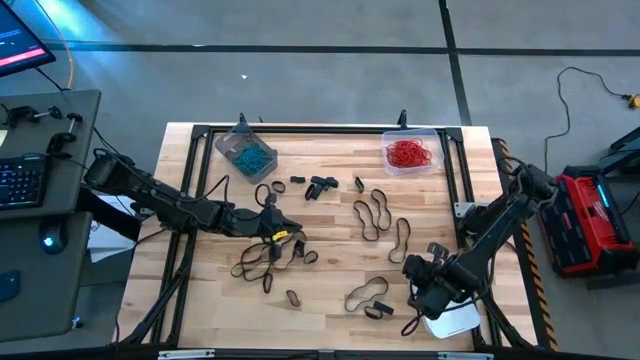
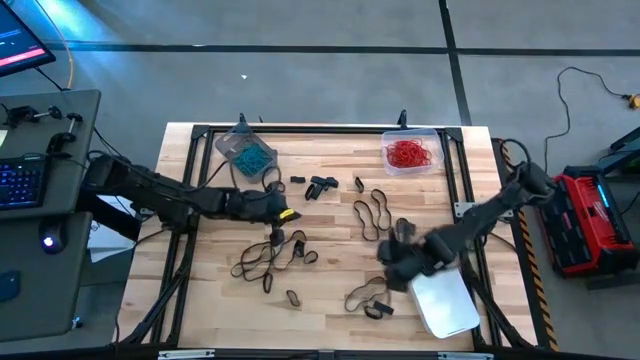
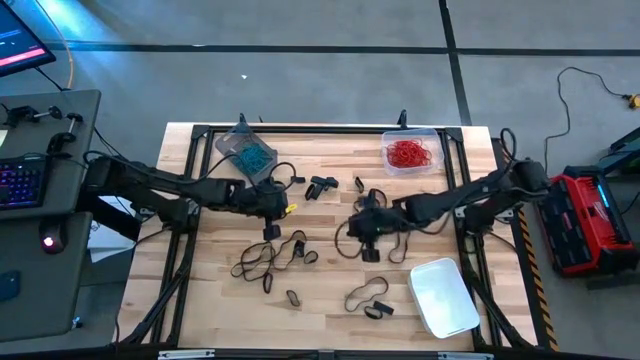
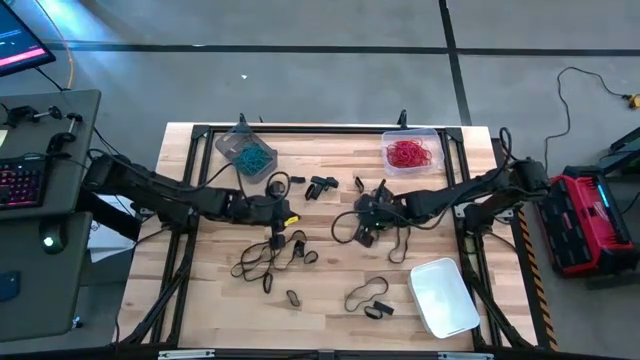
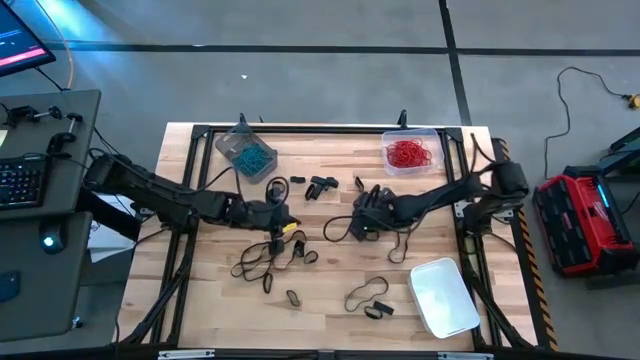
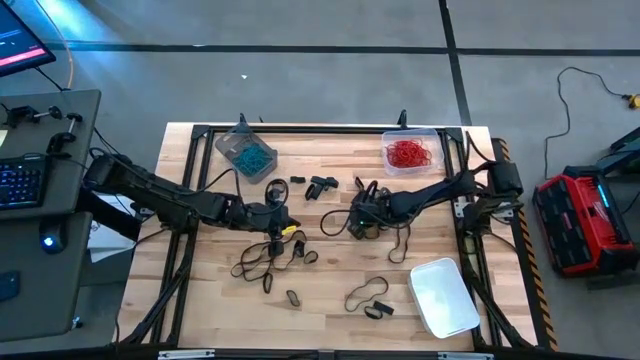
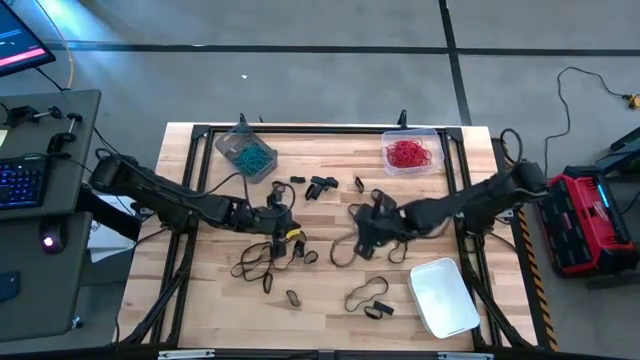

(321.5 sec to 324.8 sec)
Task: Sort rubber bands into baskets
Put the black rubber band into the white bin

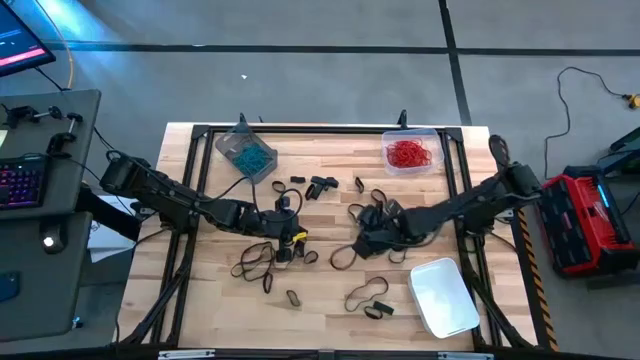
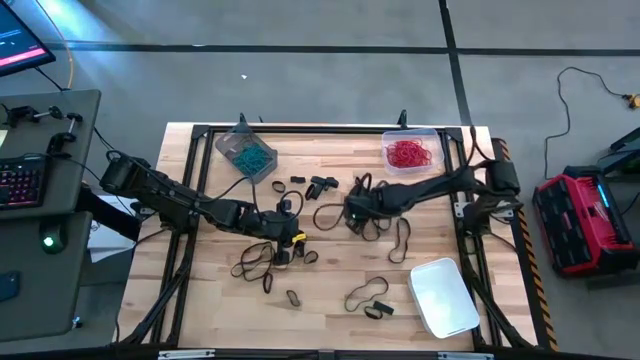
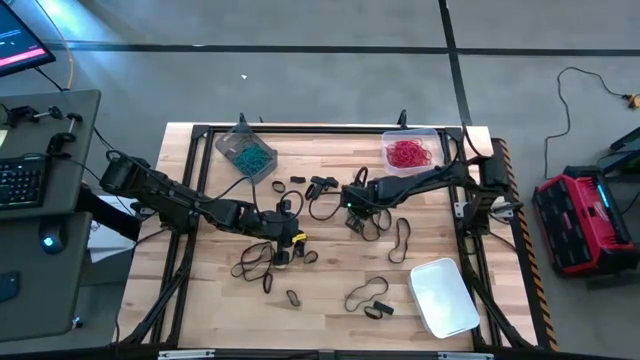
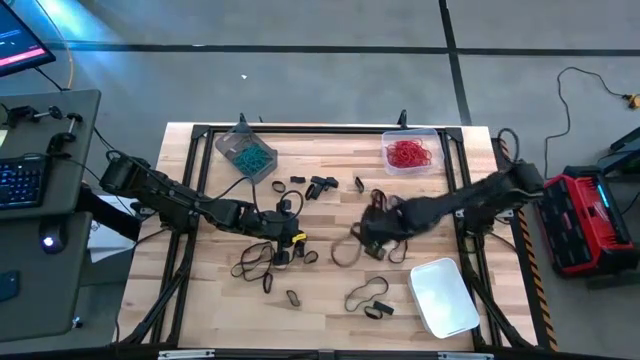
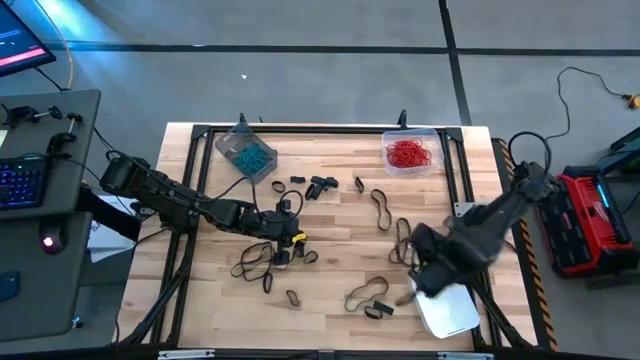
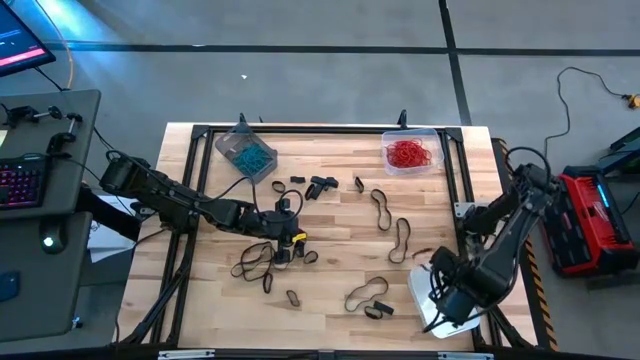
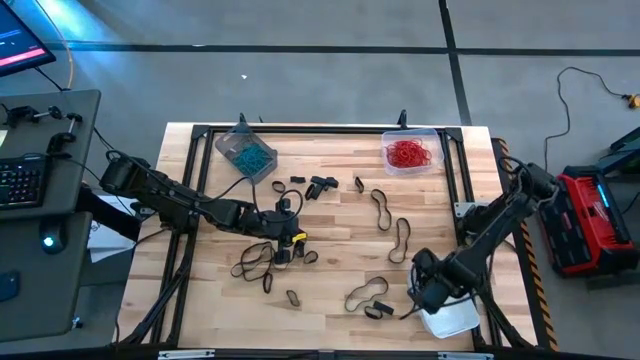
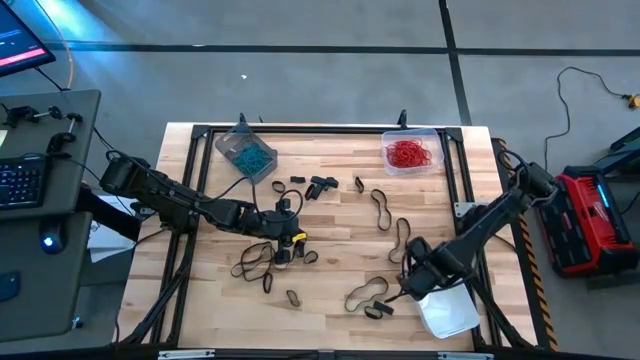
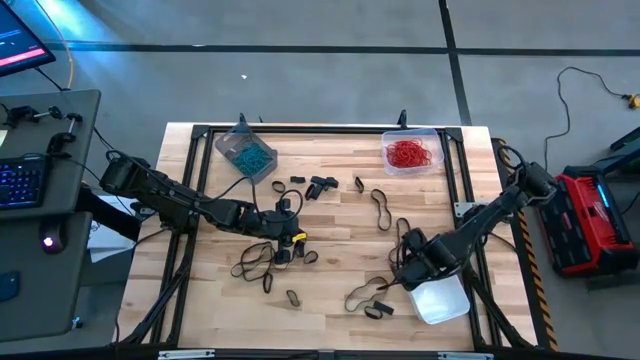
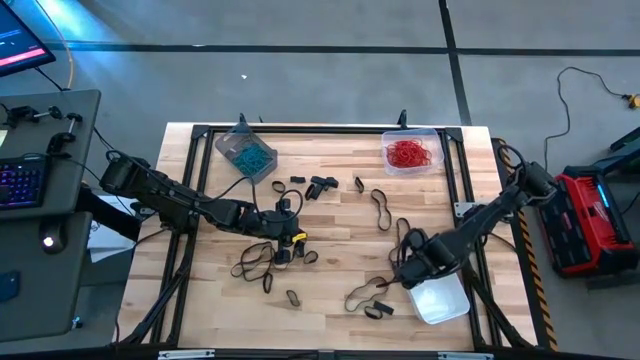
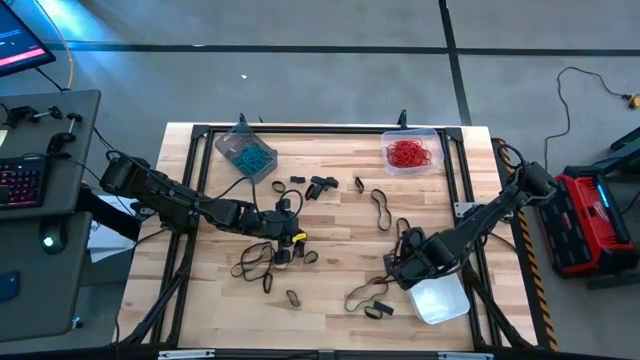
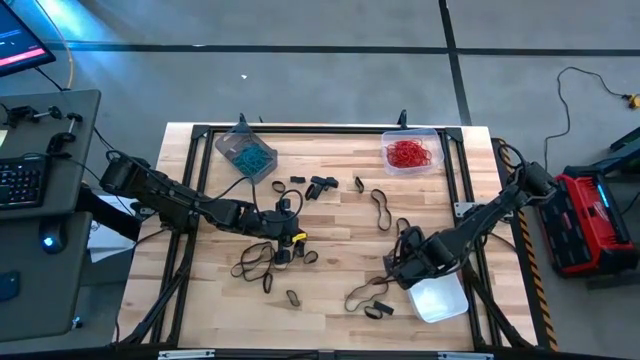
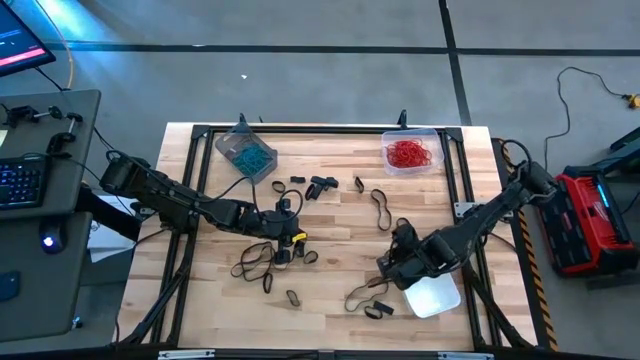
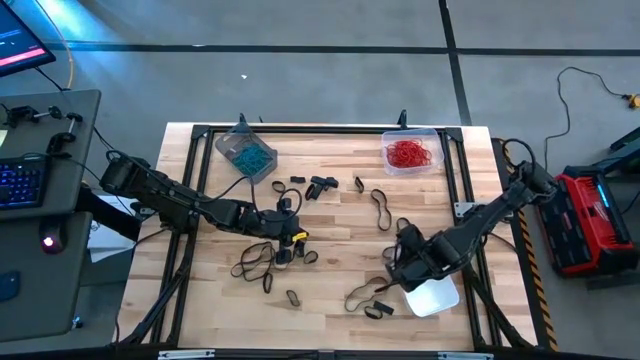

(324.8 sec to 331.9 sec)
Put the black rubber band into the white bin

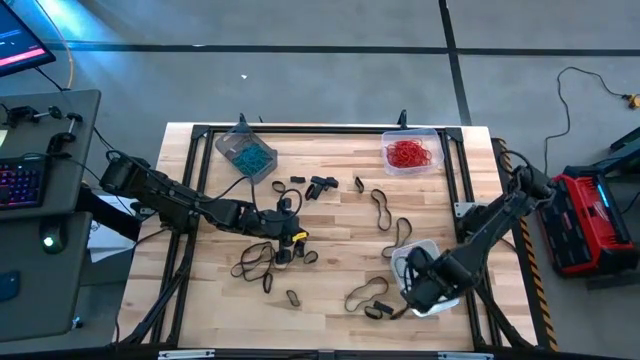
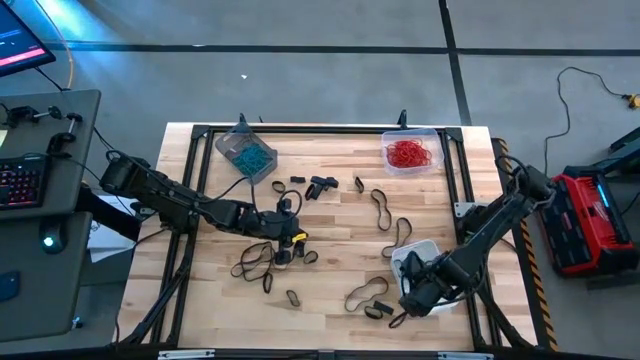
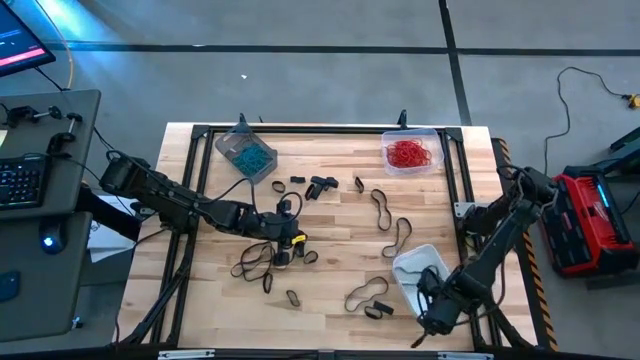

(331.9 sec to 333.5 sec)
Adjust the white bin

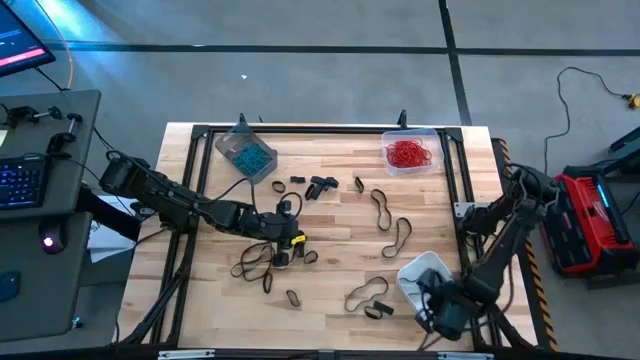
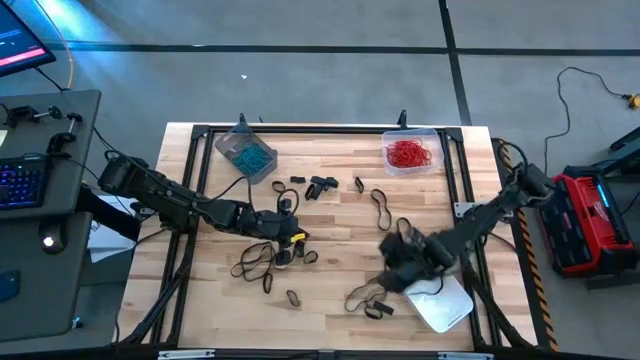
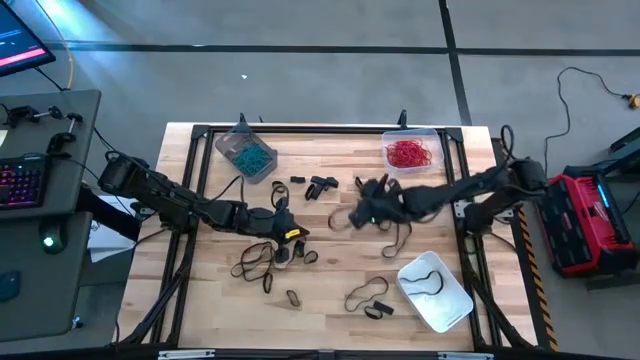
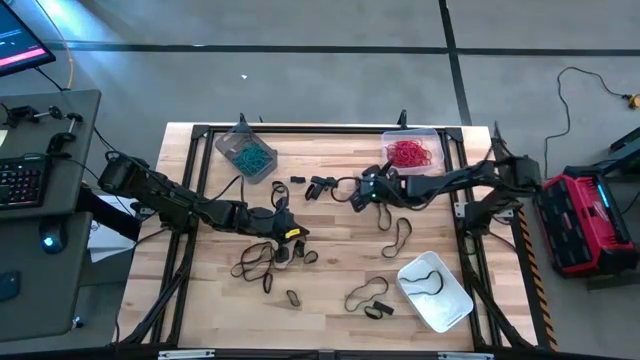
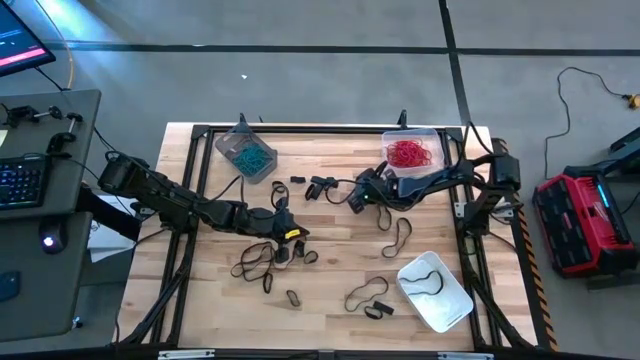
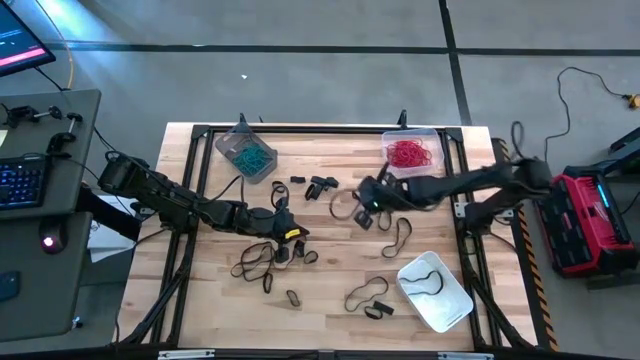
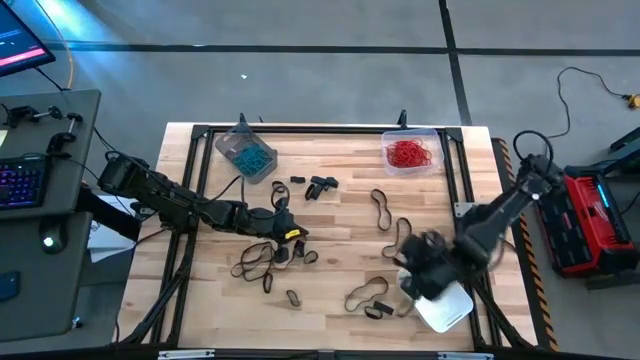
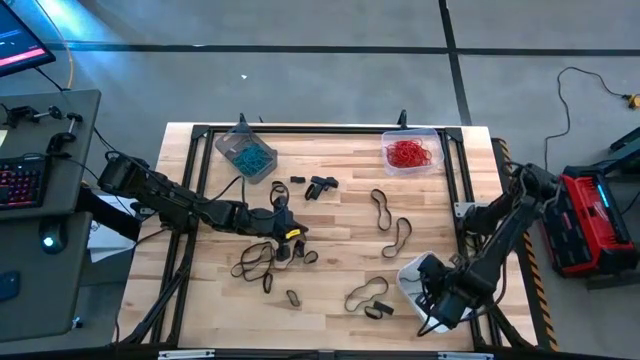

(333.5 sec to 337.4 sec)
Put the black rubber band into the white bin

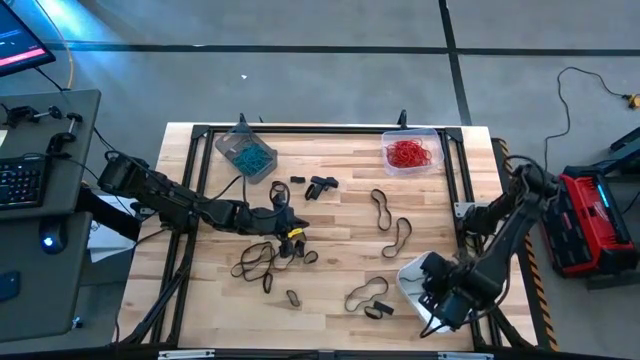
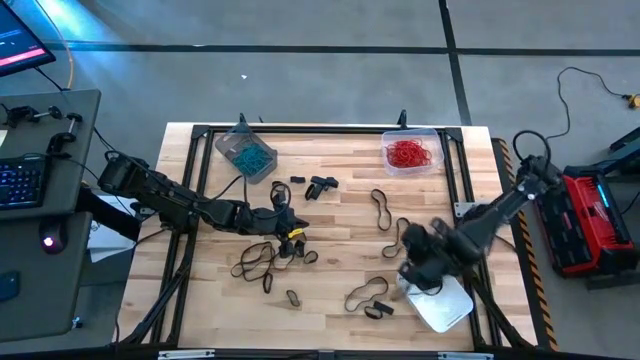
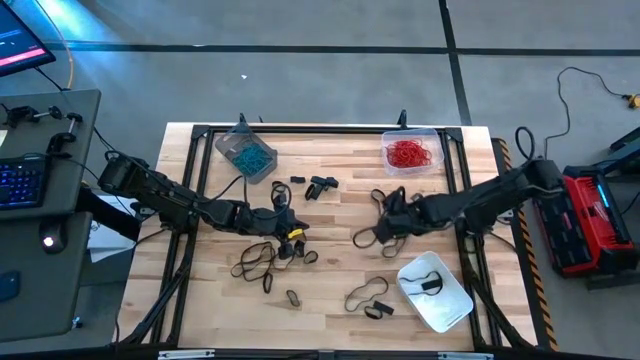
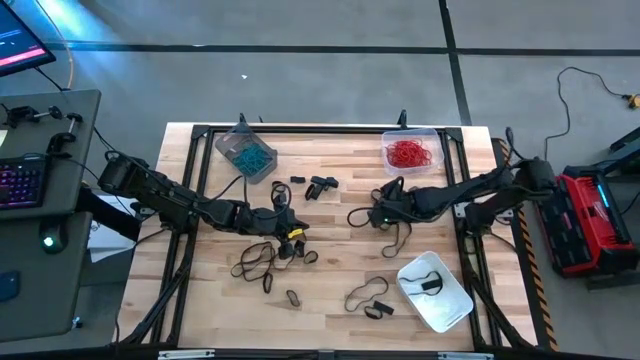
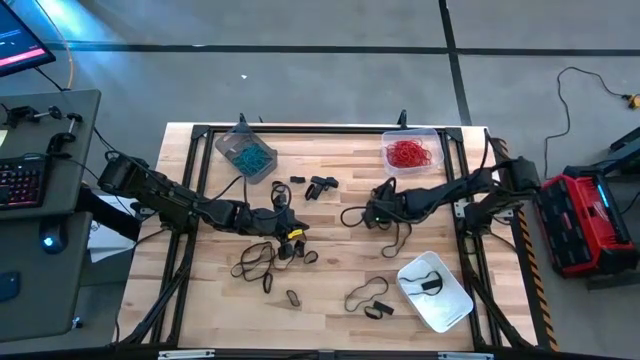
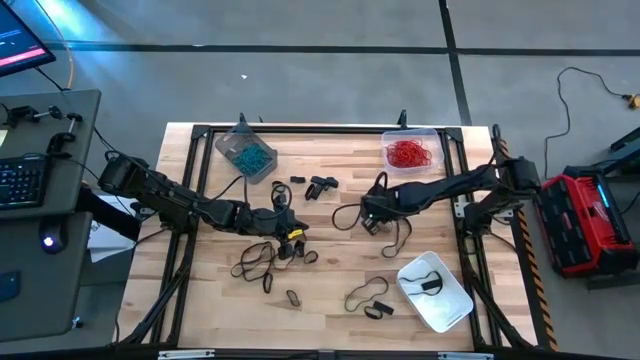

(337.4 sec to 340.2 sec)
Put the black rubber band into the white bin

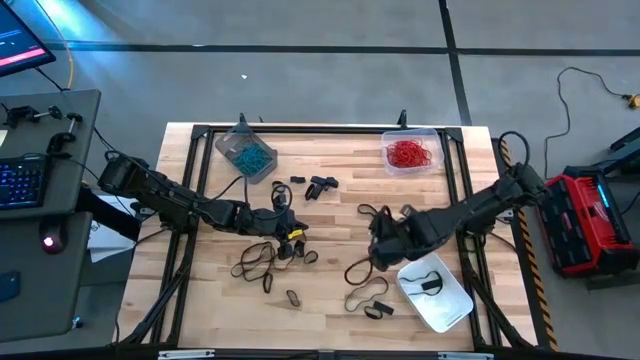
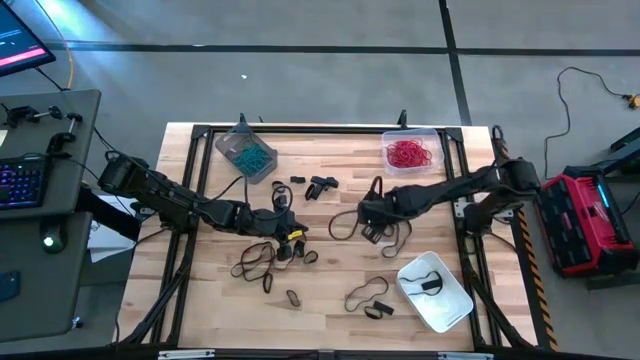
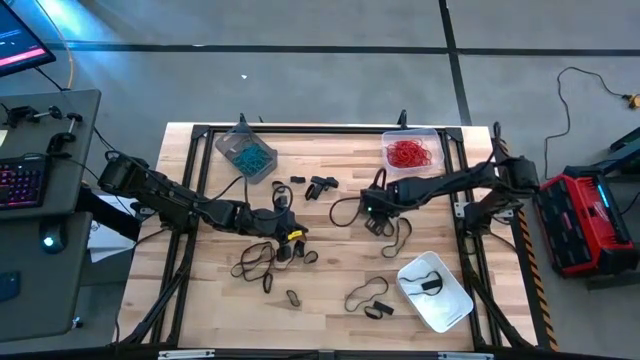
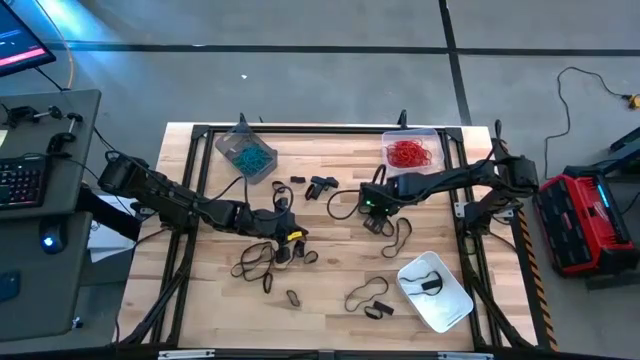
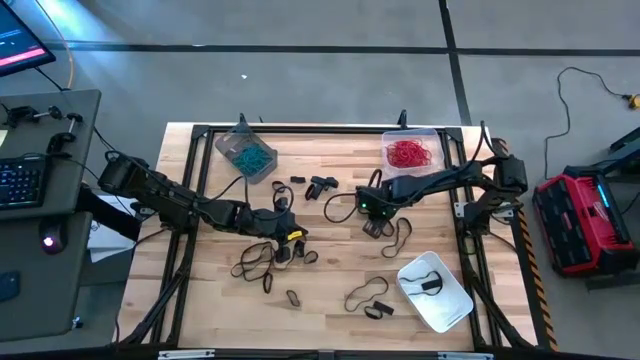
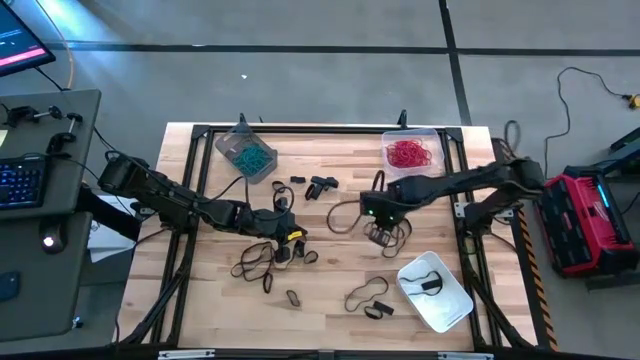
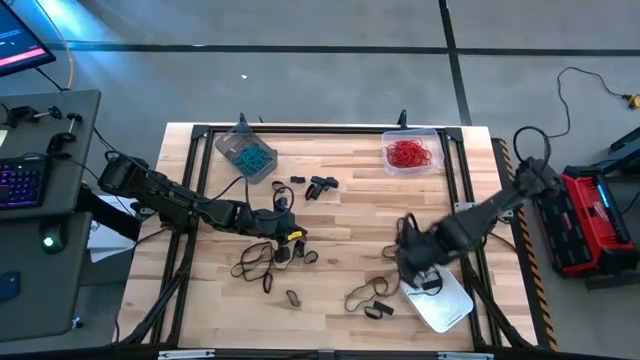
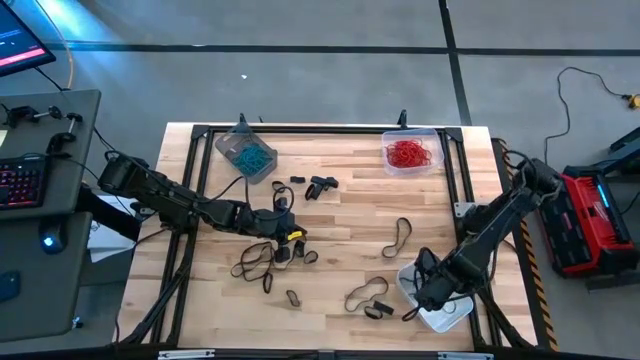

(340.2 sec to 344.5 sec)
Put the black rubber band into the white bin
